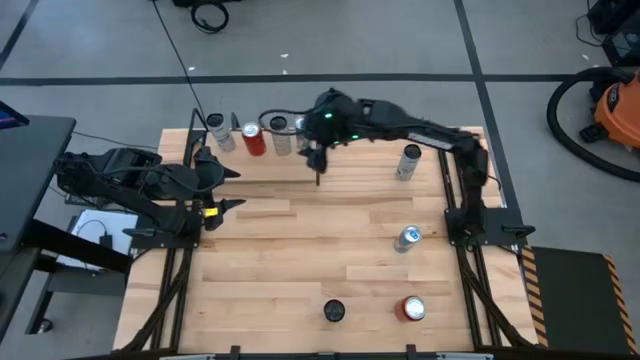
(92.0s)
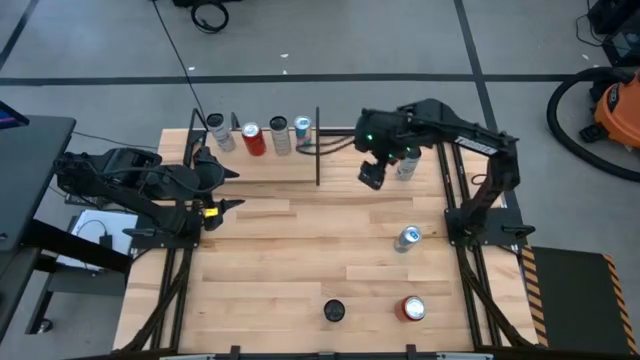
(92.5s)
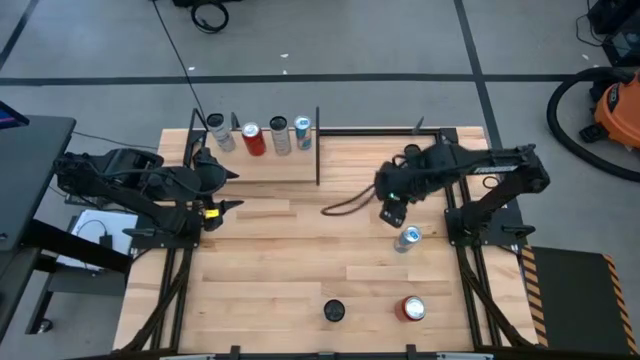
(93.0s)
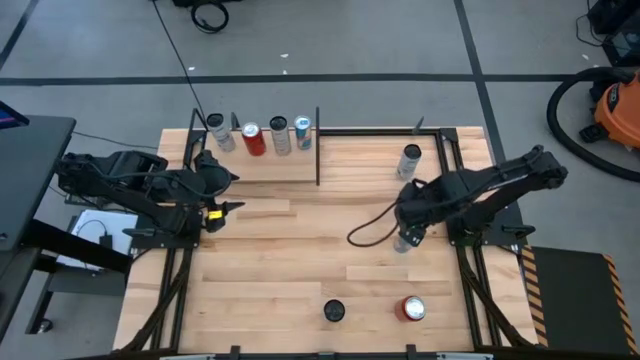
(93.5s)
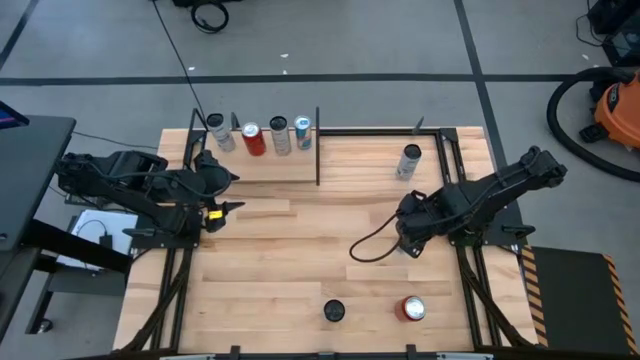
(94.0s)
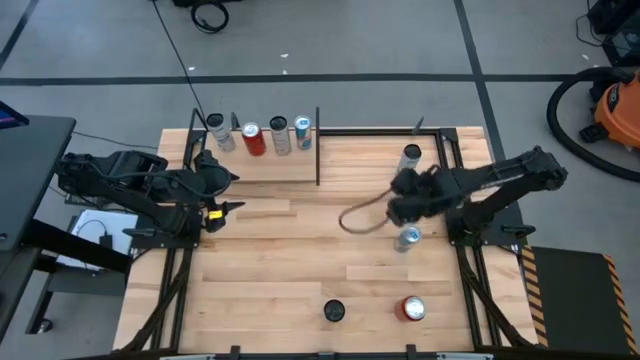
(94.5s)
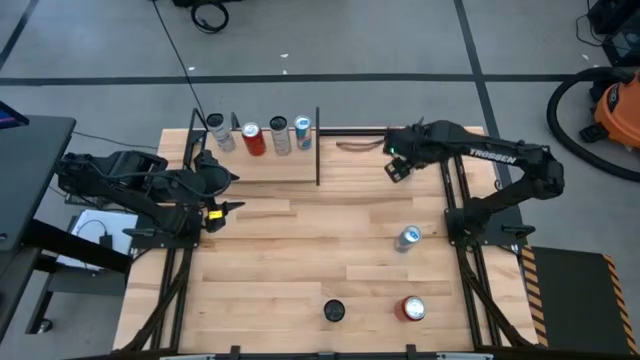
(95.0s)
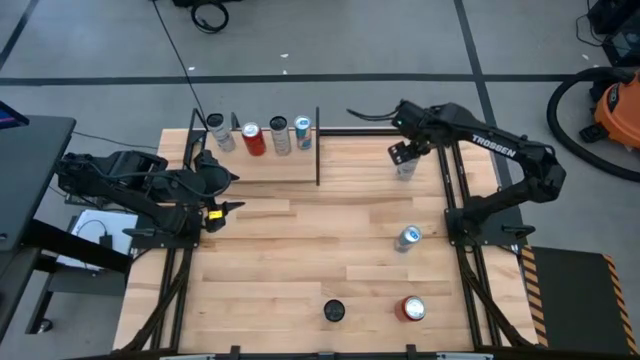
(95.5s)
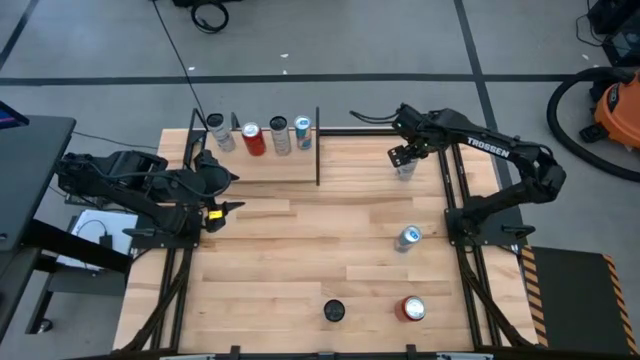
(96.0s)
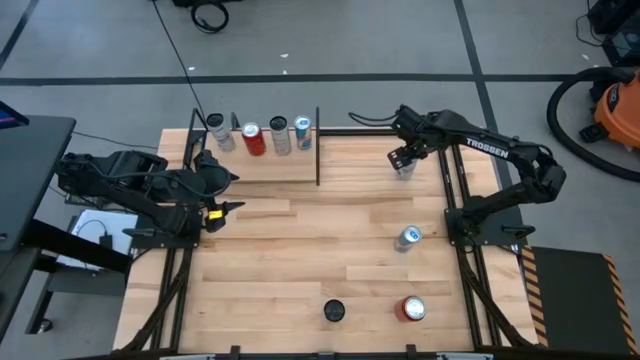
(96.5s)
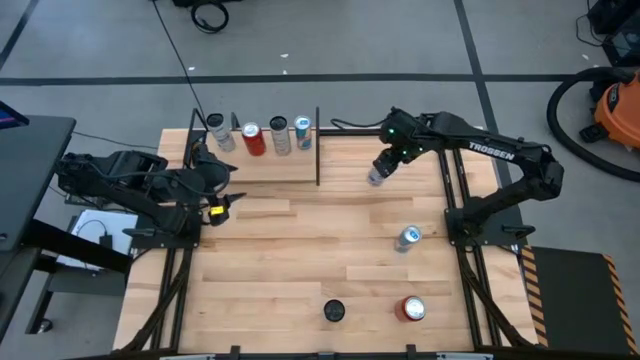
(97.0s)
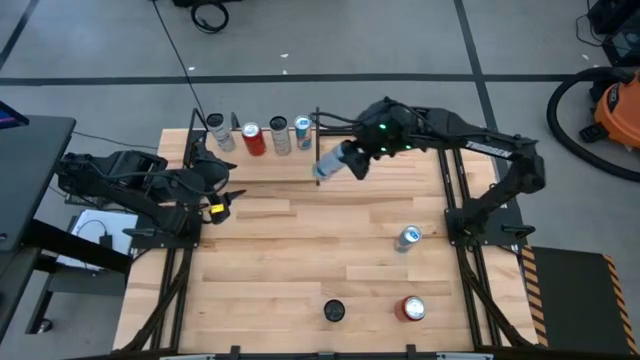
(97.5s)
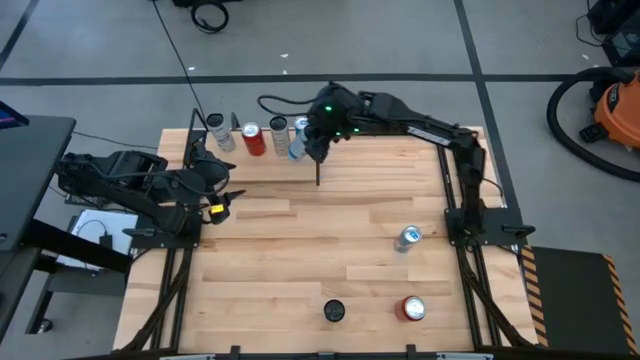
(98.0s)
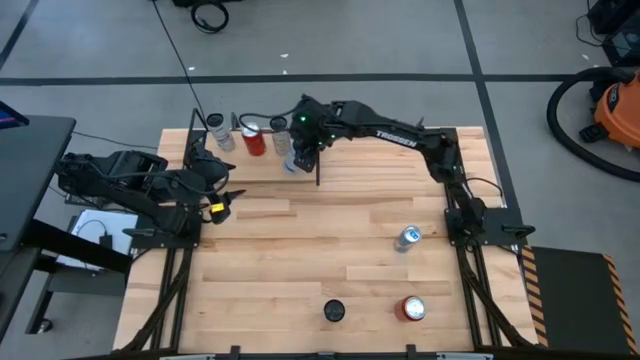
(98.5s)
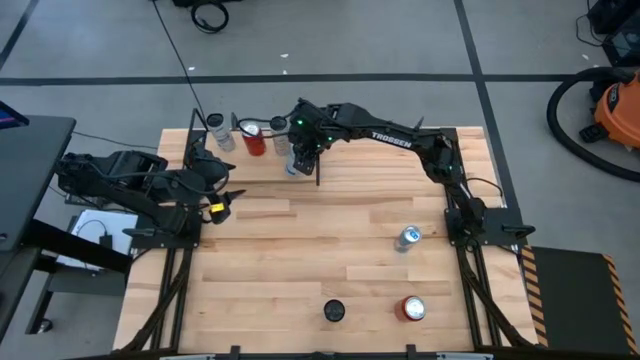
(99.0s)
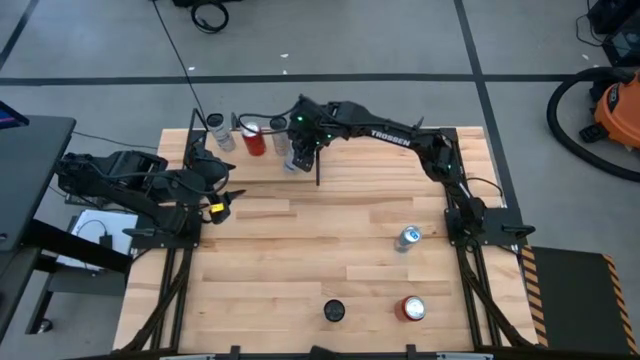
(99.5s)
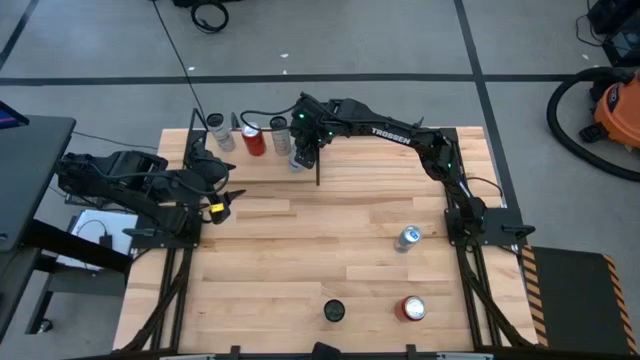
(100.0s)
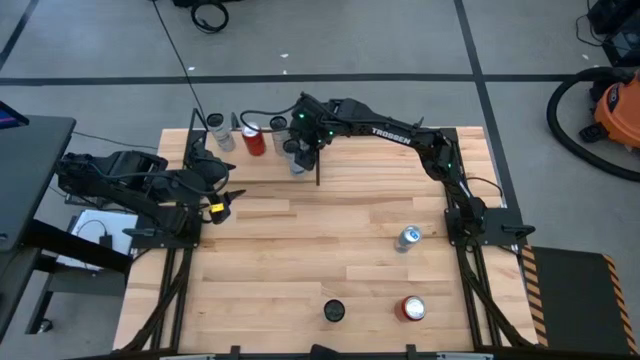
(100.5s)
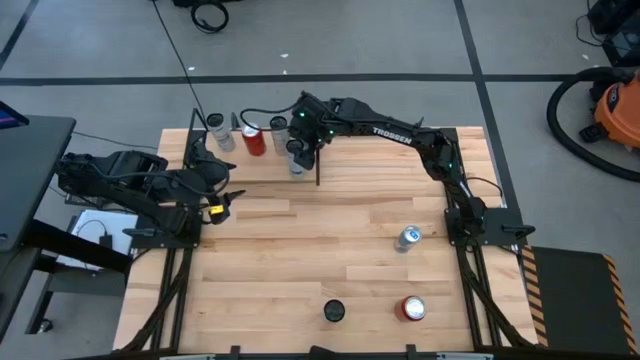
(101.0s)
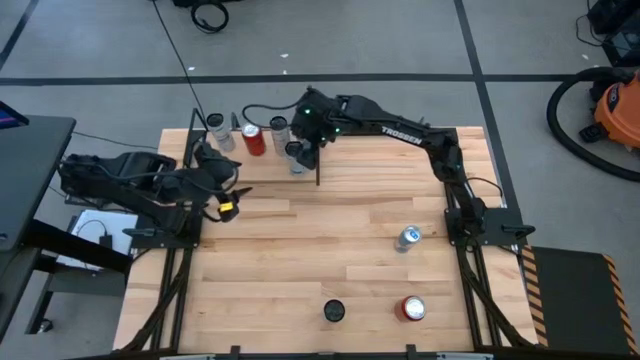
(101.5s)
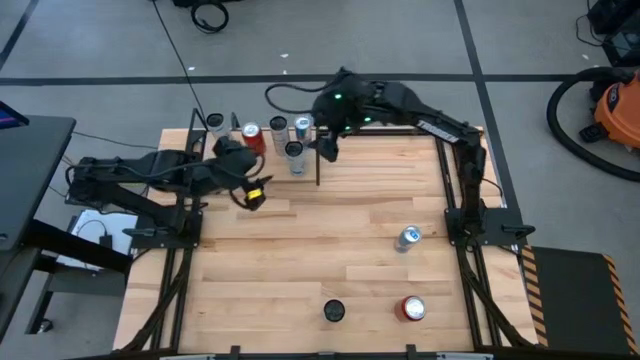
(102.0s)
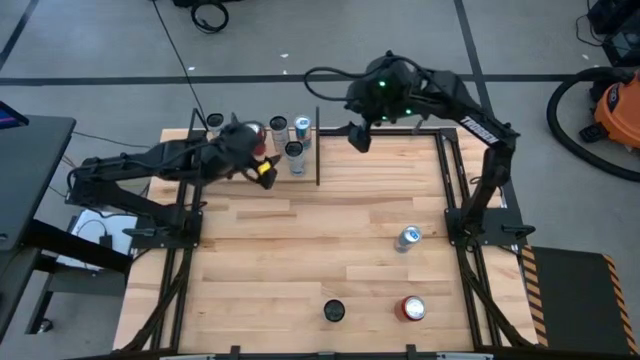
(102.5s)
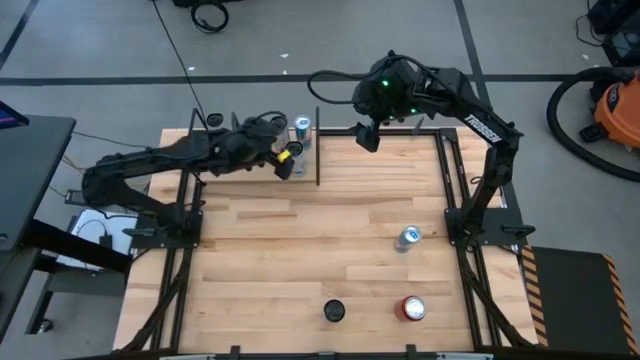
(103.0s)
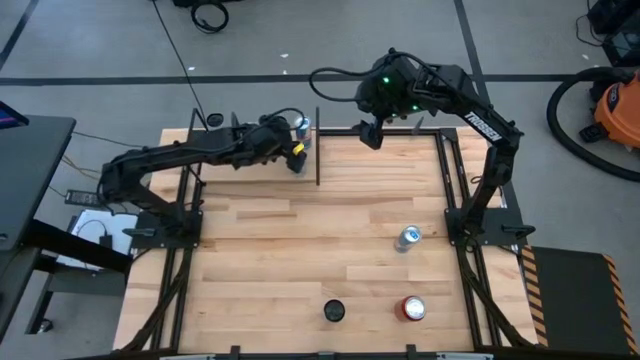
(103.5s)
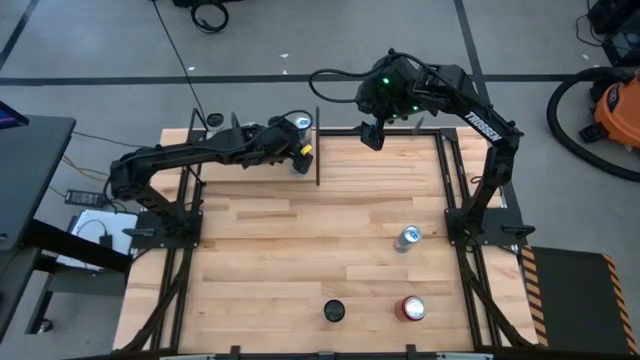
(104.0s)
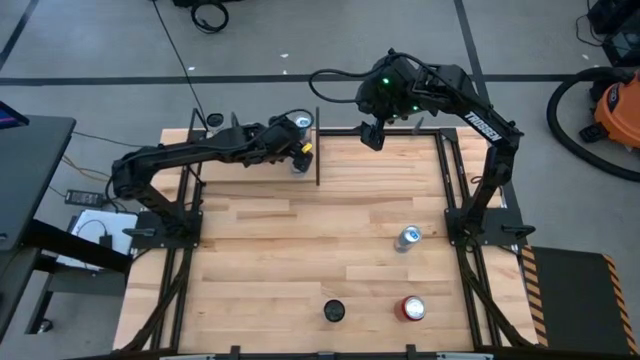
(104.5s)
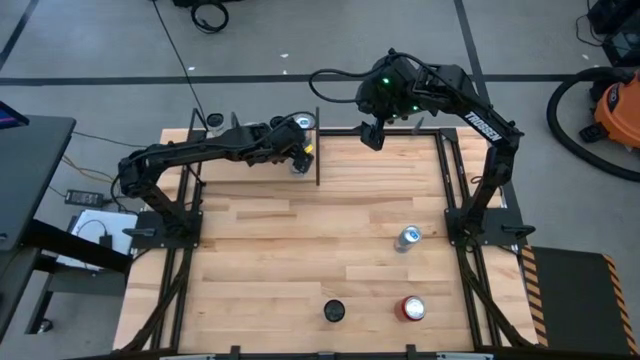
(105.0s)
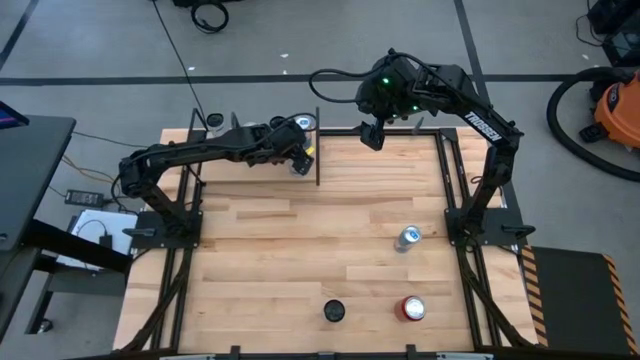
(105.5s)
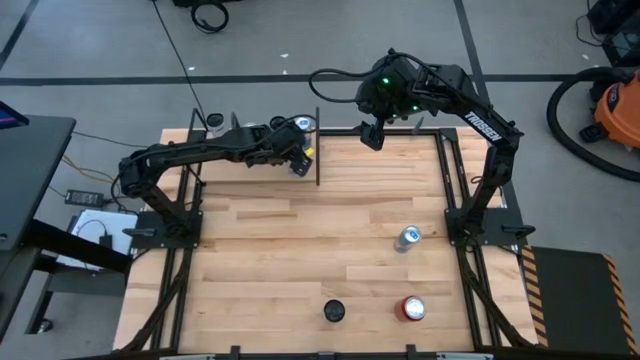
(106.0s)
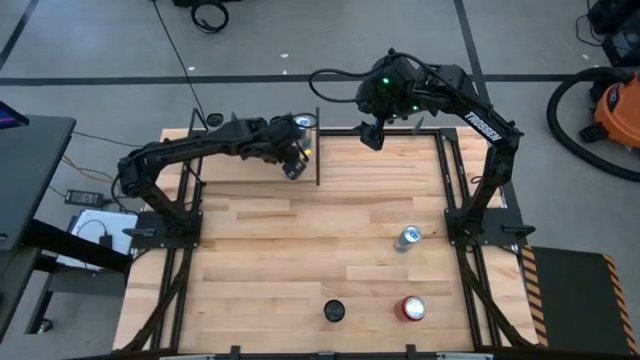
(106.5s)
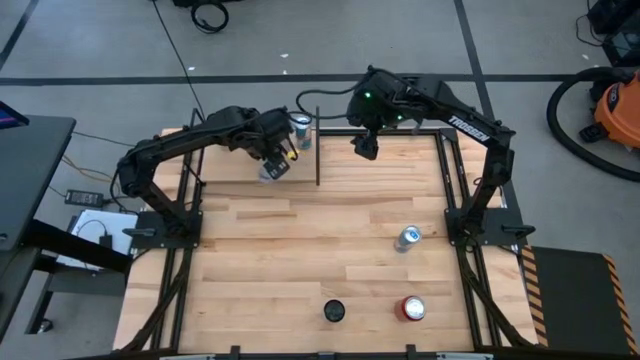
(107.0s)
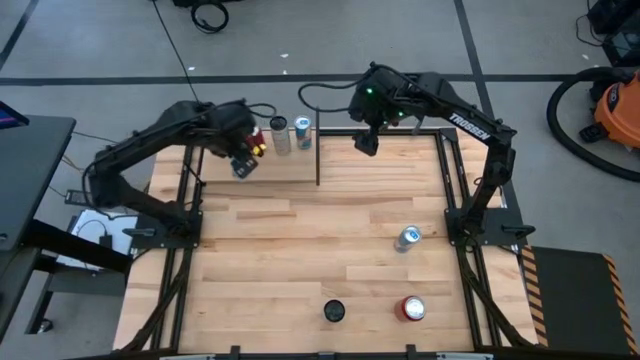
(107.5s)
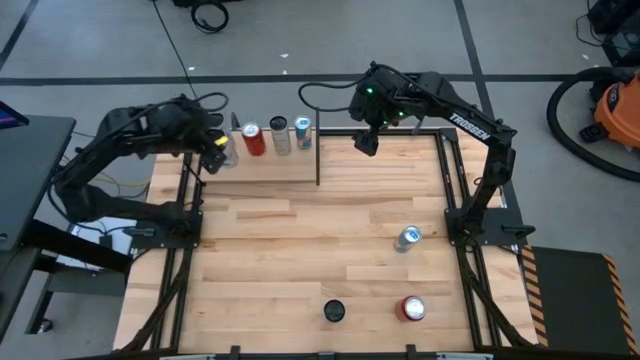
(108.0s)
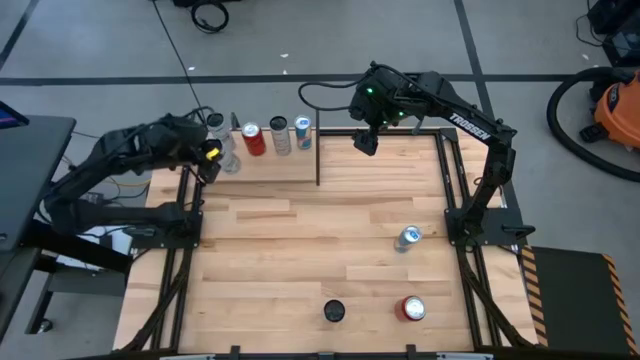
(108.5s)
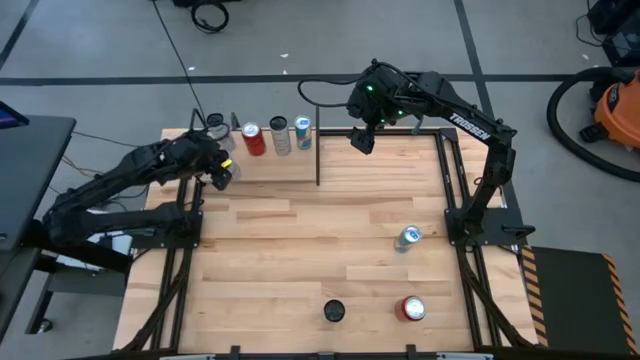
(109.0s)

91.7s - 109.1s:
Task: Place canned beverage on shelf
Put the blue-white soda can on the shelf aligned with the other blue-white soda can
